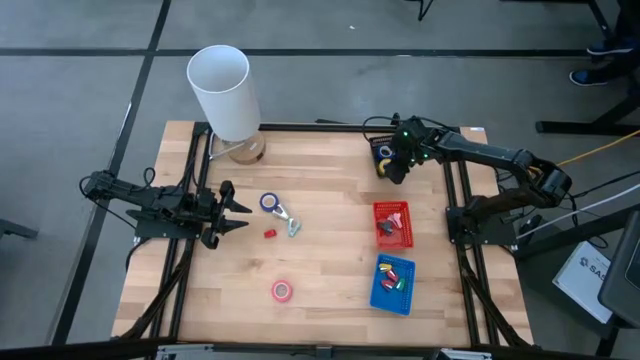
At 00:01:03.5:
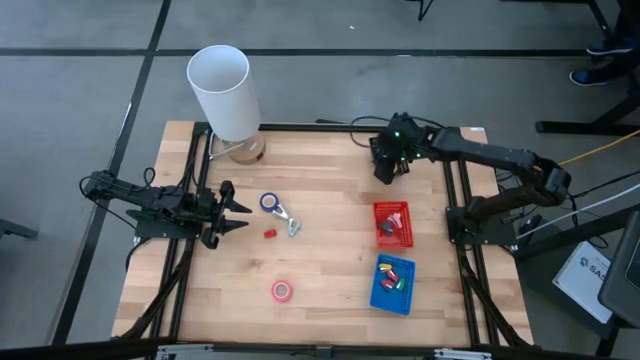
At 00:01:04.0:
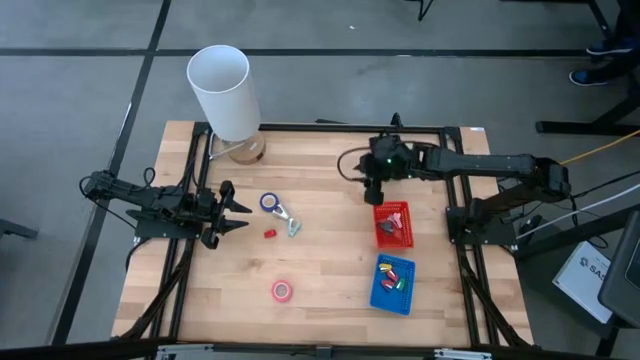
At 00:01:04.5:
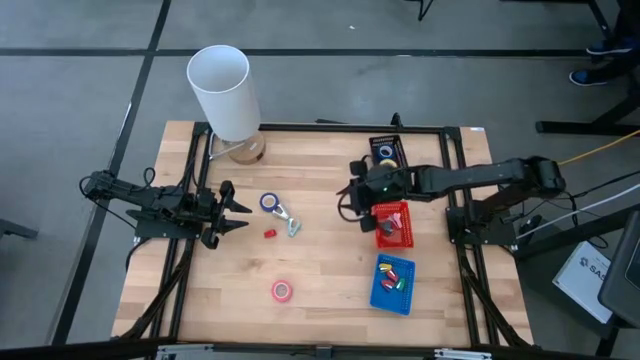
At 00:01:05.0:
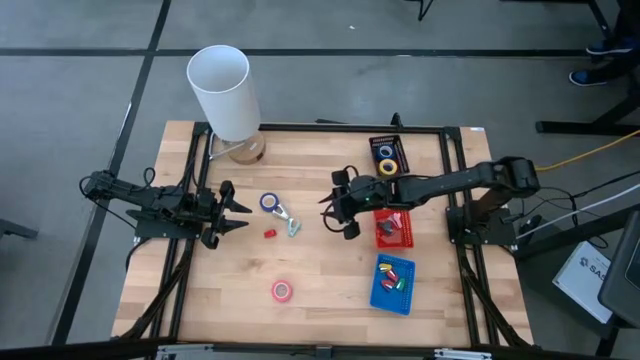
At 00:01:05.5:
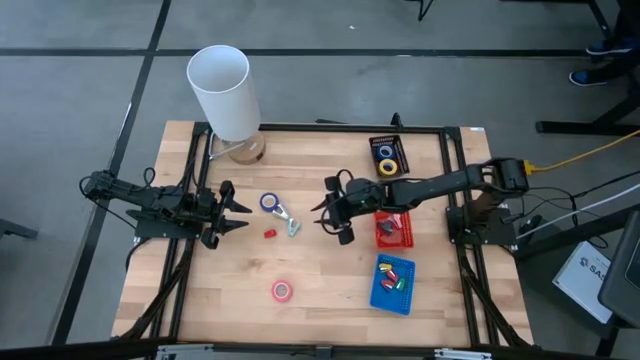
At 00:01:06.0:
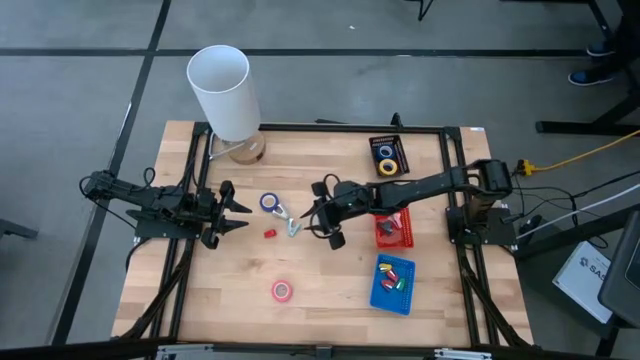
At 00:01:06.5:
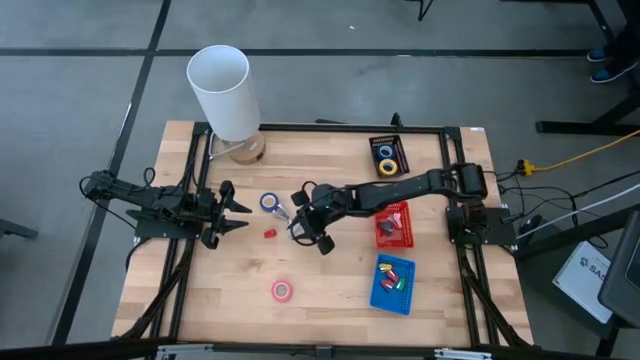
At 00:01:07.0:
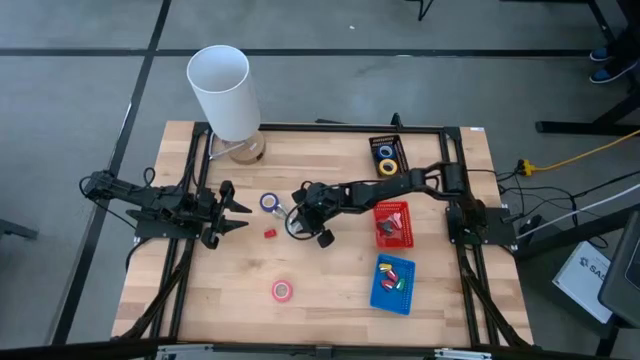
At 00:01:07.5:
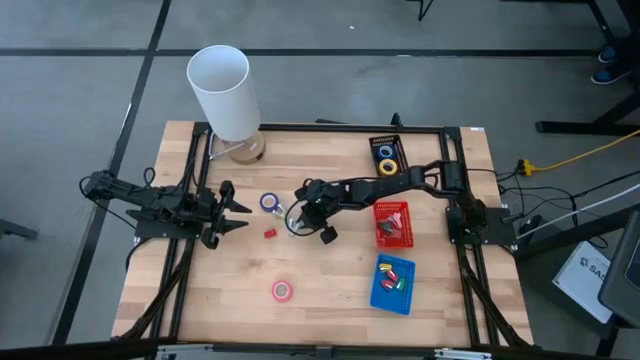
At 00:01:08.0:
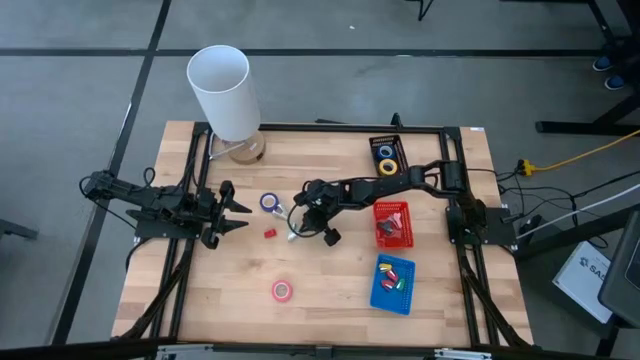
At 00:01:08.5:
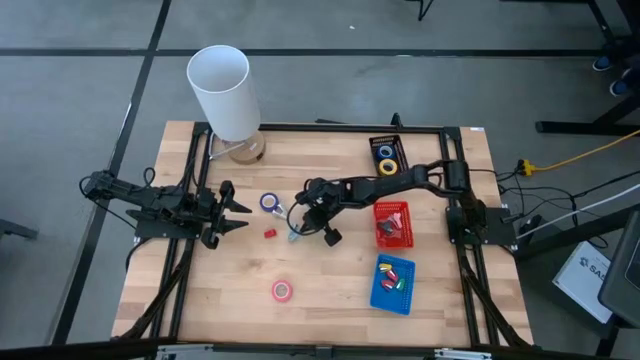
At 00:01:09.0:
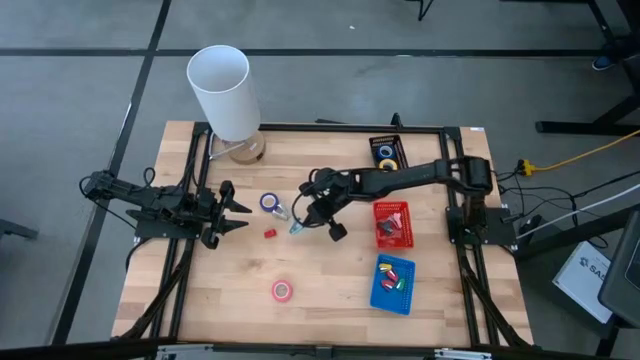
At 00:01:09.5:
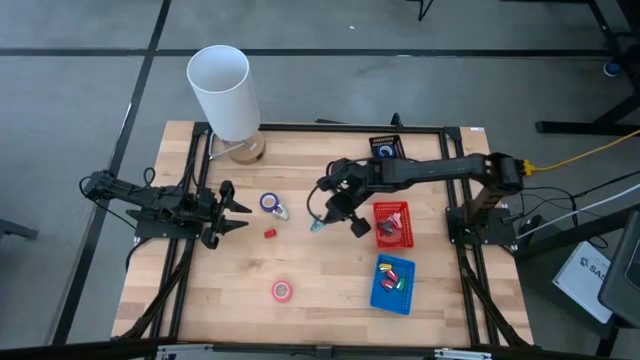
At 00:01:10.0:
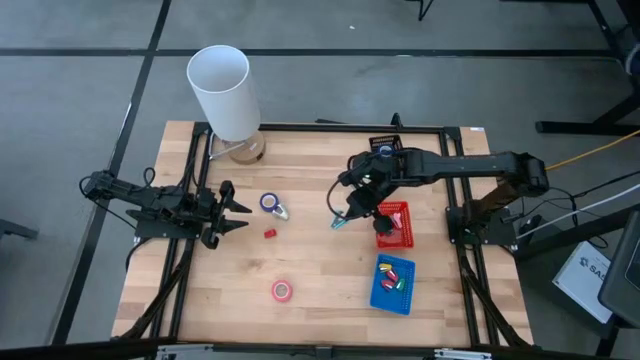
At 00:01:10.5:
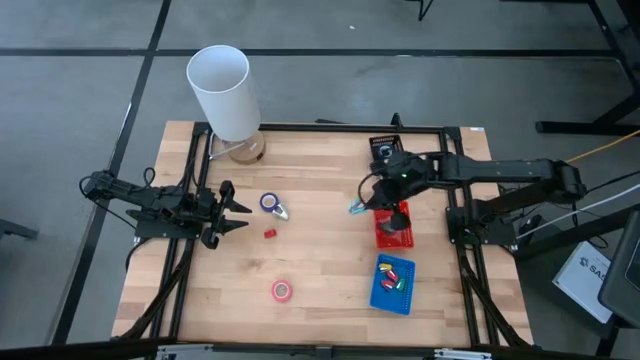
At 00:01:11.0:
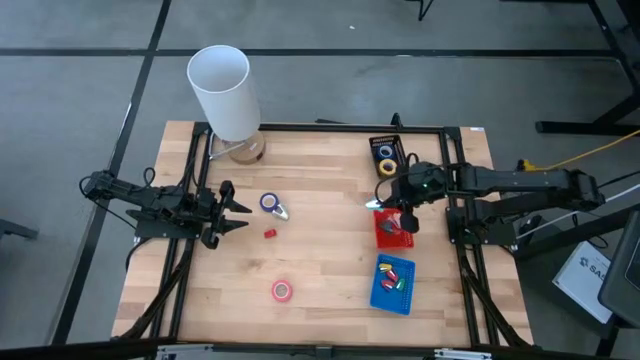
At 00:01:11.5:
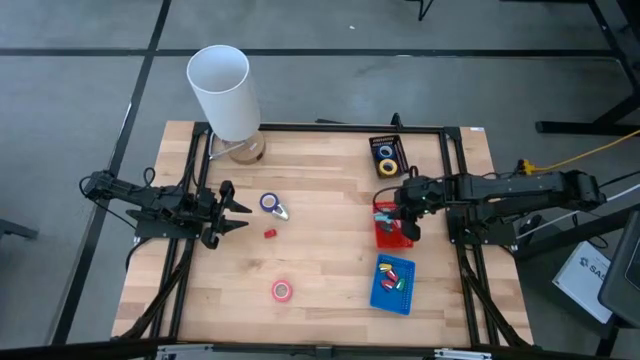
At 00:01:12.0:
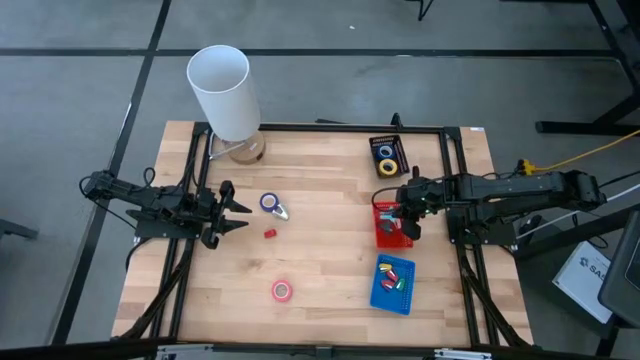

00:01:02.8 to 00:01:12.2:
Task: Pick and place Stapler, Stapler remover, tape
Put the light blue staple remover into the red basket

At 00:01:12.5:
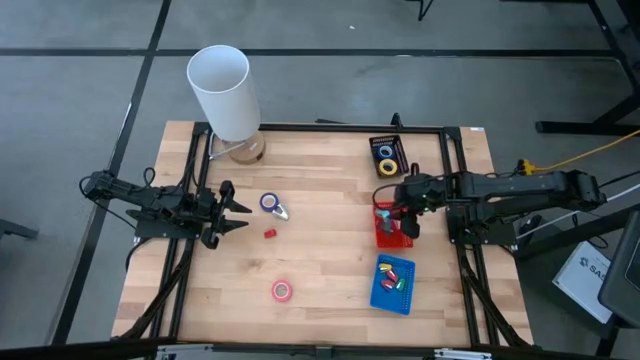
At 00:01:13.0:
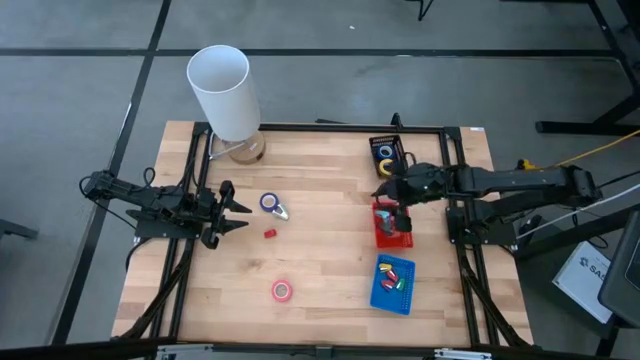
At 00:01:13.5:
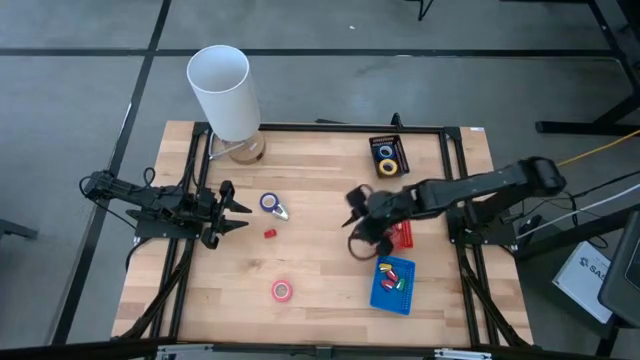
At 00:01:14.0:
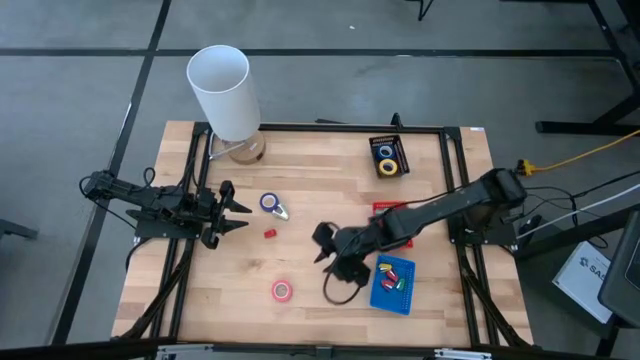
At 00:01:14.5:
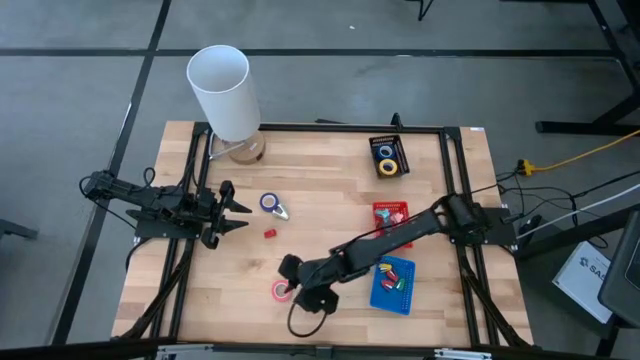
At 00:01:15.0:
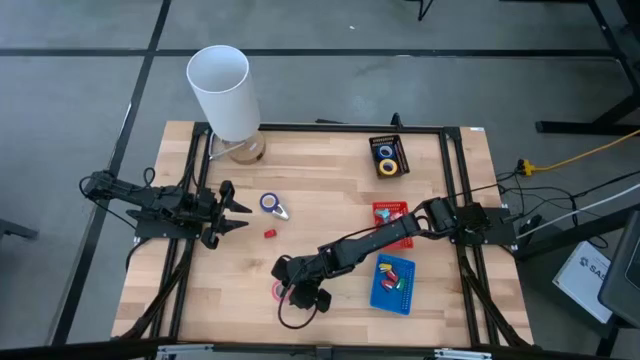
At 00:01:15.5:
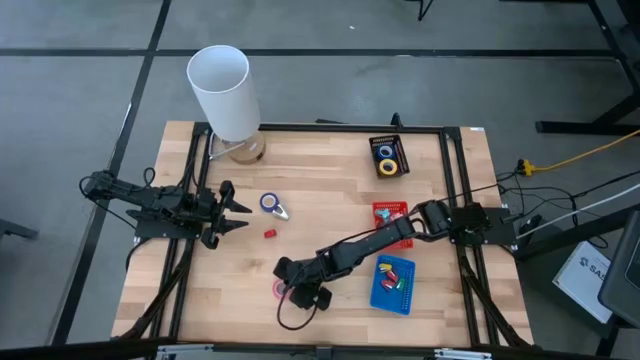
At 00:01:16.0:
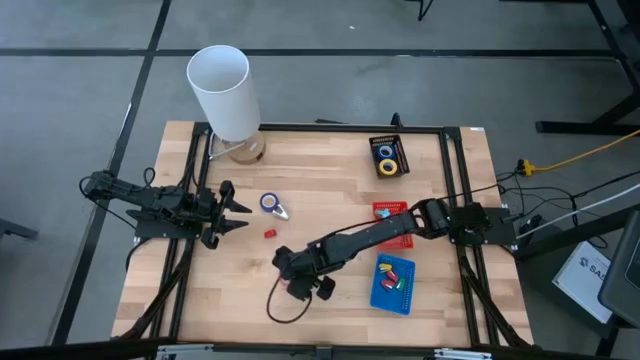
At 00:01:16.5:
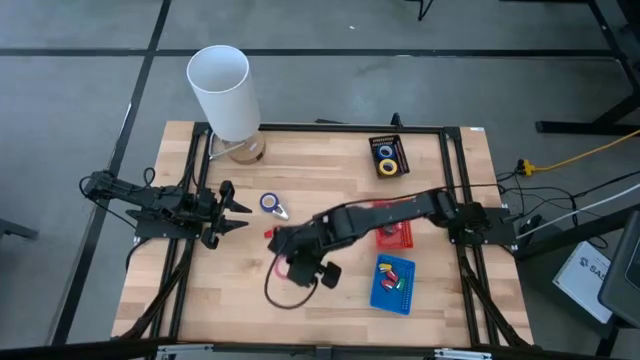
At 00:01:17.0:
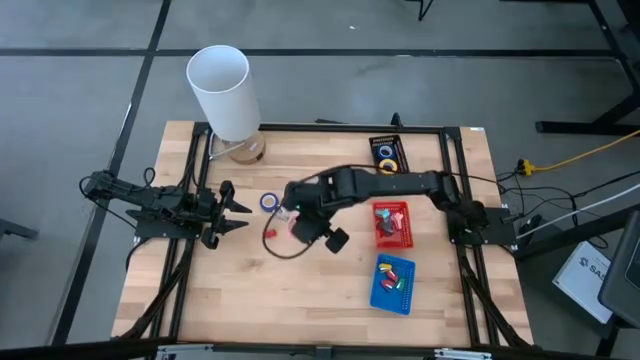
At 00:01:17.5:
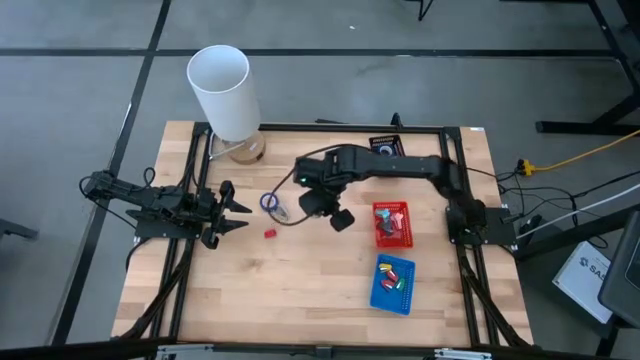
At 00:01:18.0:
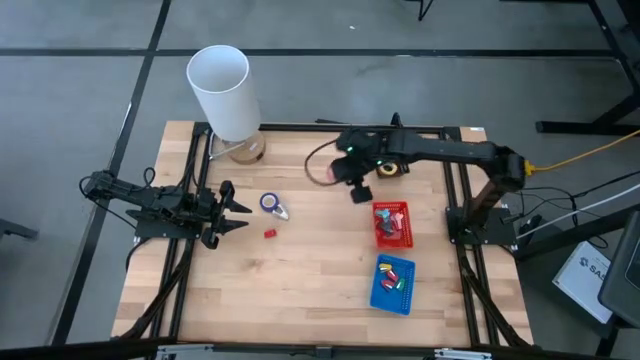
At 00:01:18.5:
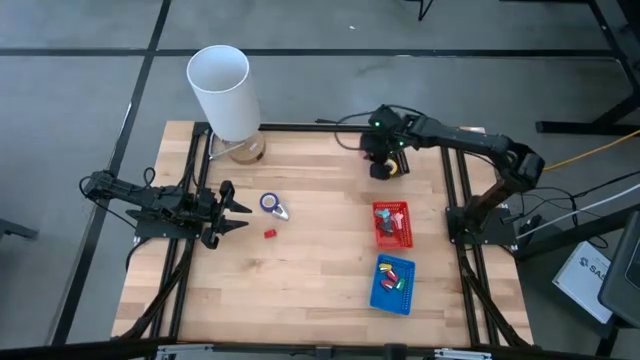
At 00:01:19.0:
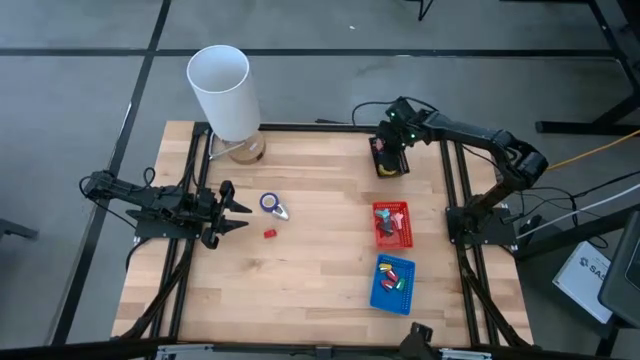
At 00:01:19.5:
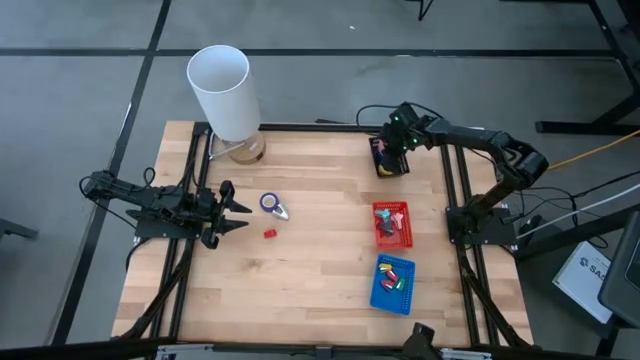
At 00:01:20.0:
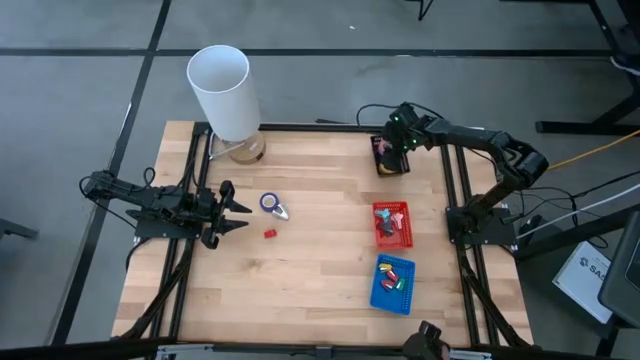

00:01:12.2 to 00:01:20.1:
Put the pink tape into the black basket

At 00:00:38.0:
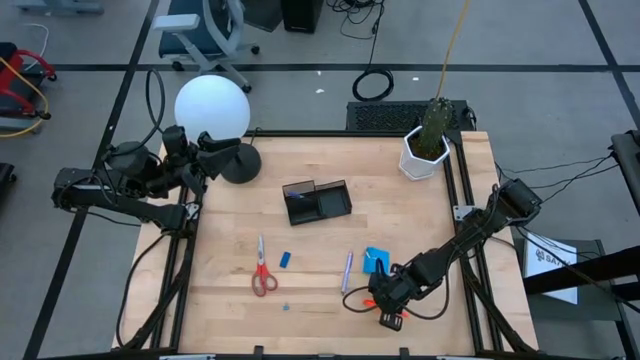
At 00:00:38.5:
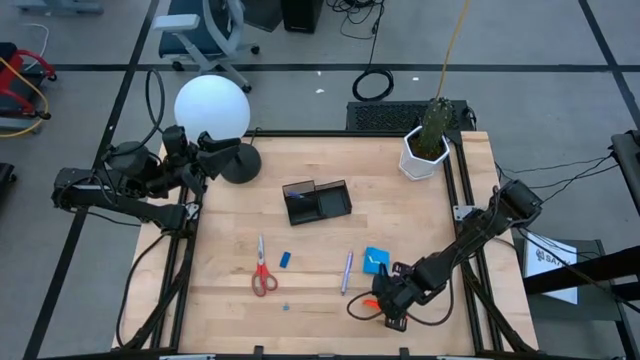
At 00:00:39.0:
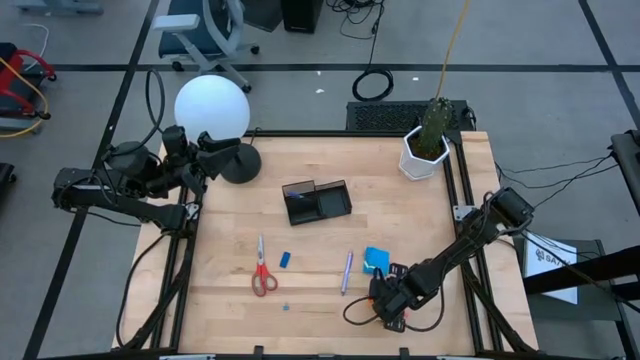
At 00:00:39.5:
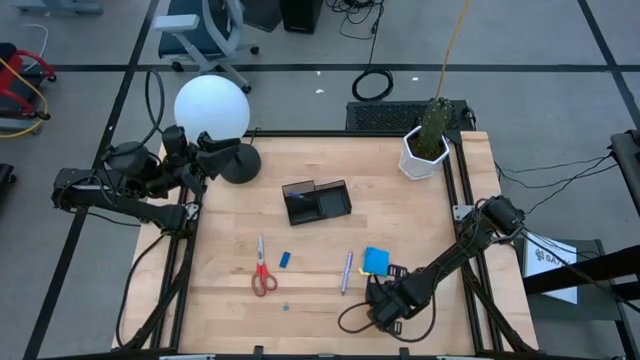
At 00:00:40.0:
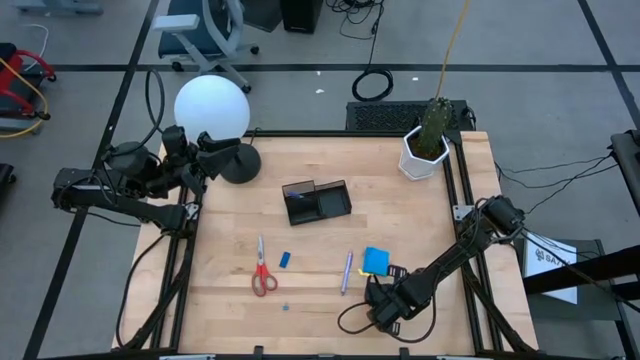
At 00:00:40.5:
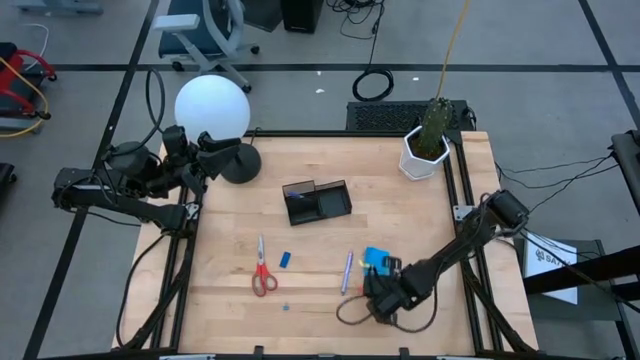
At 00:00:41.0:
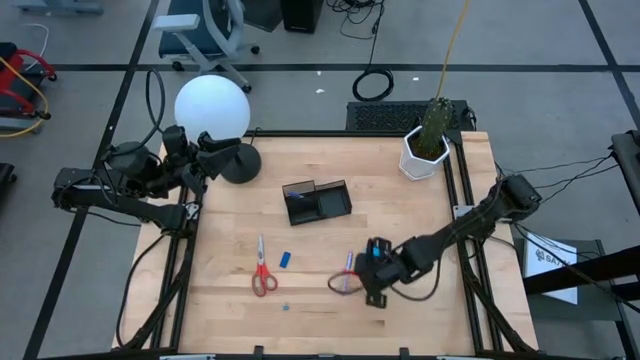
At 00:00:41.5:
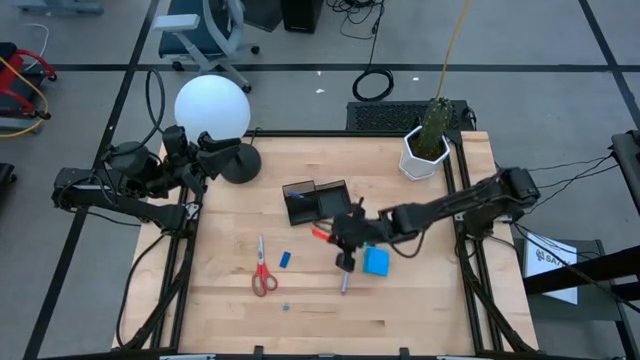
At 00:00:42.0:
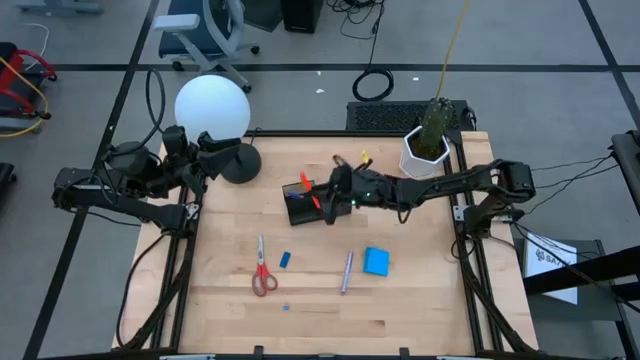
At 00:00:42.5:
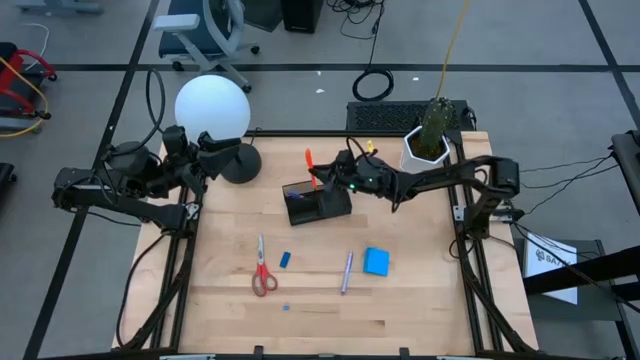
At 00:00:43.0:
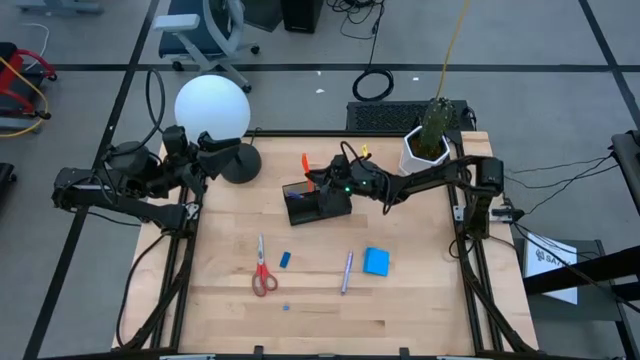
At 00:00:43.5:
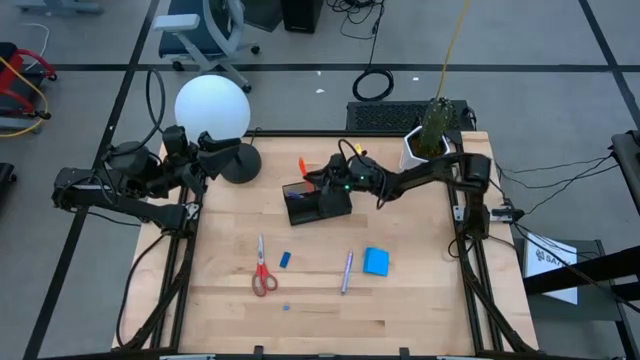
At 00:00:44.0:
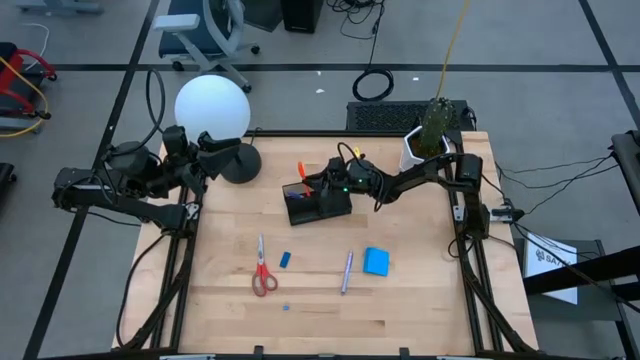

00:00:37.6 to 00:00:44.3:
Task: Pick and place office supplies into organizer
Put the orange pen into the black desk organizer
